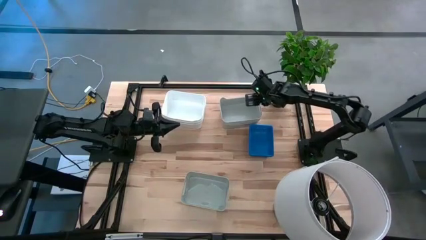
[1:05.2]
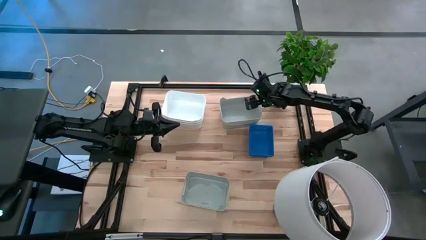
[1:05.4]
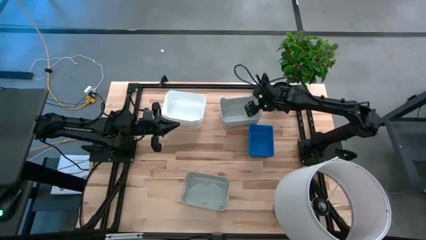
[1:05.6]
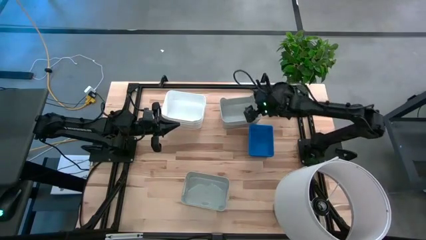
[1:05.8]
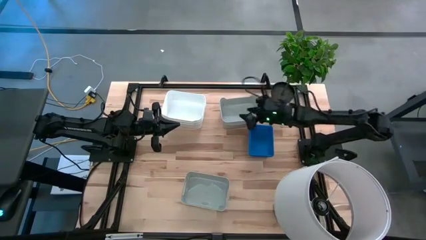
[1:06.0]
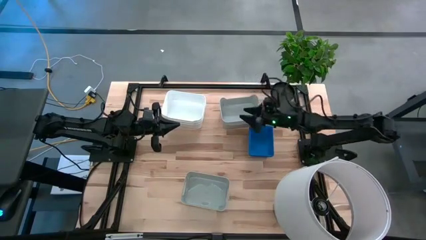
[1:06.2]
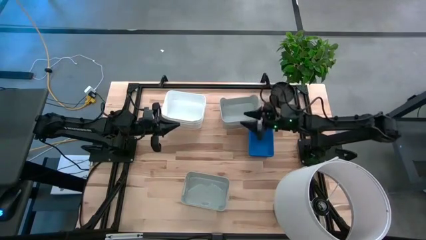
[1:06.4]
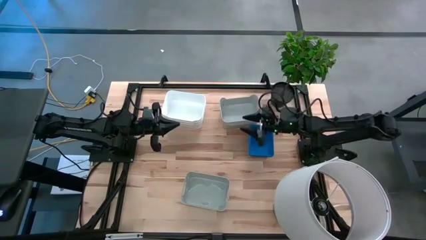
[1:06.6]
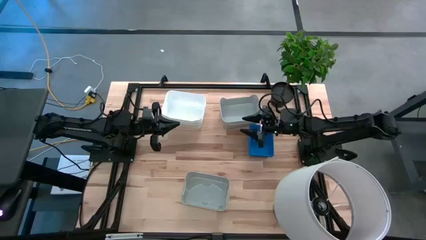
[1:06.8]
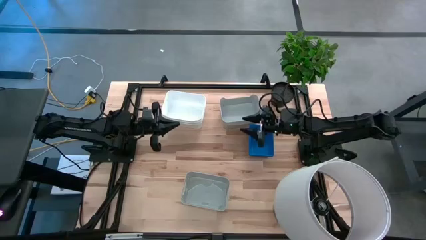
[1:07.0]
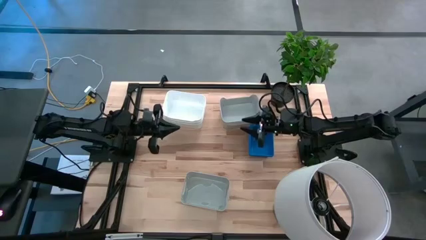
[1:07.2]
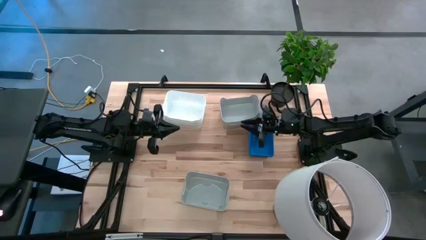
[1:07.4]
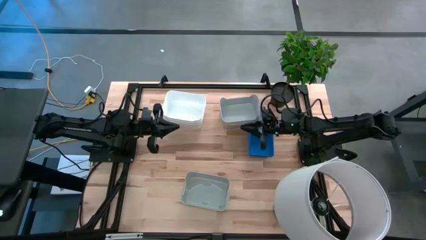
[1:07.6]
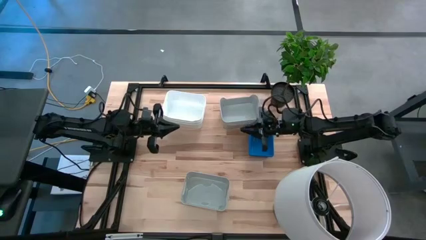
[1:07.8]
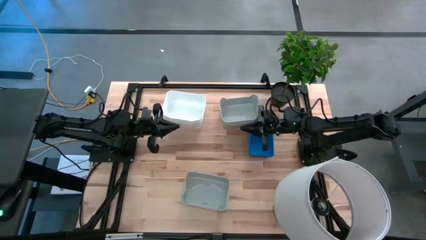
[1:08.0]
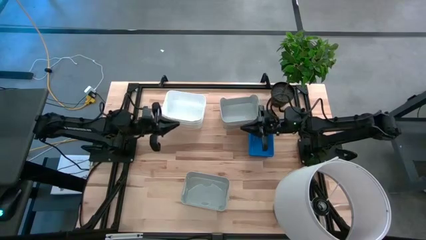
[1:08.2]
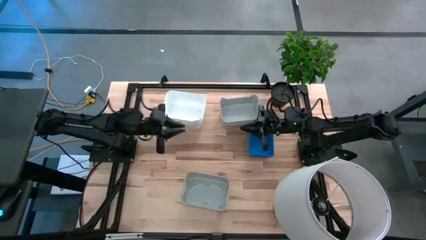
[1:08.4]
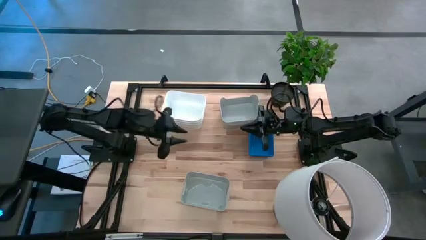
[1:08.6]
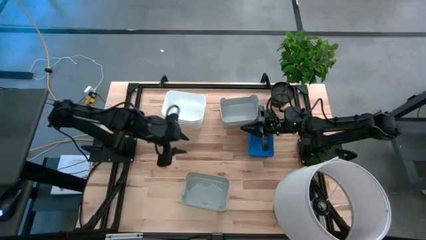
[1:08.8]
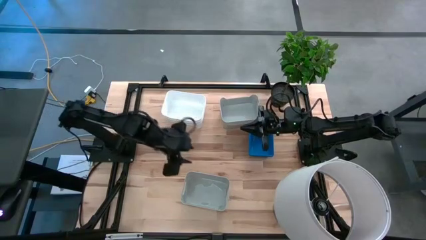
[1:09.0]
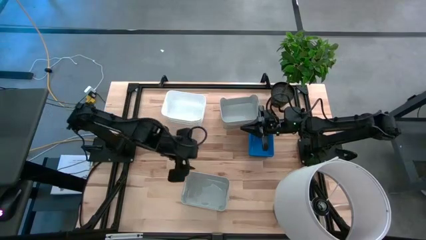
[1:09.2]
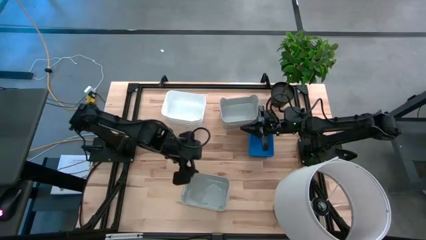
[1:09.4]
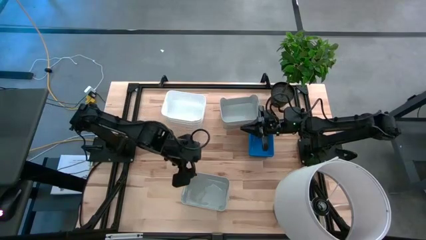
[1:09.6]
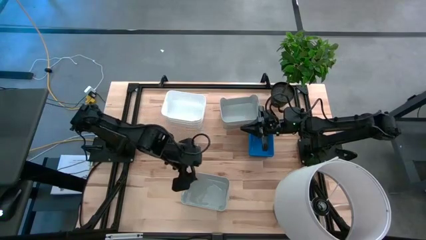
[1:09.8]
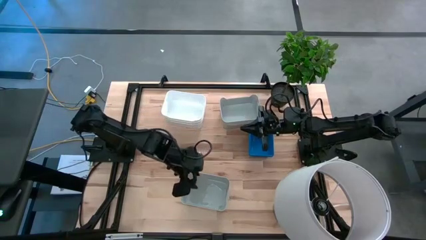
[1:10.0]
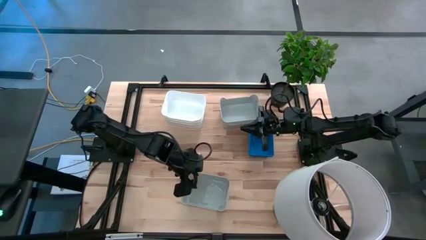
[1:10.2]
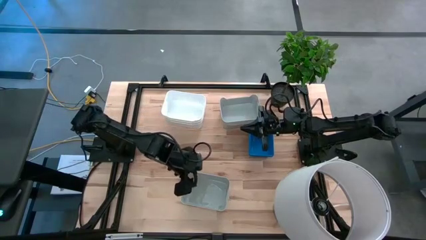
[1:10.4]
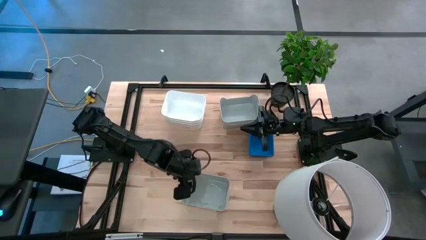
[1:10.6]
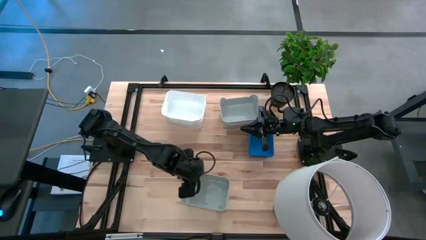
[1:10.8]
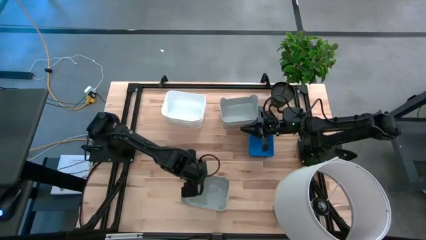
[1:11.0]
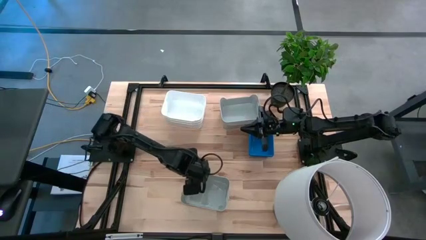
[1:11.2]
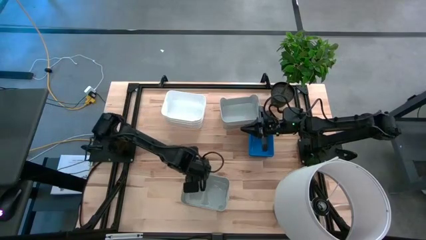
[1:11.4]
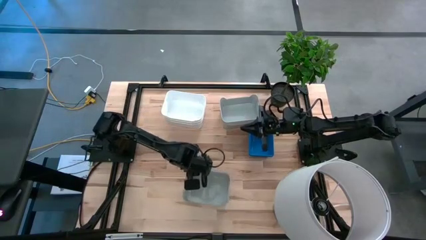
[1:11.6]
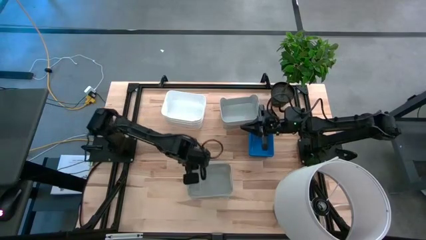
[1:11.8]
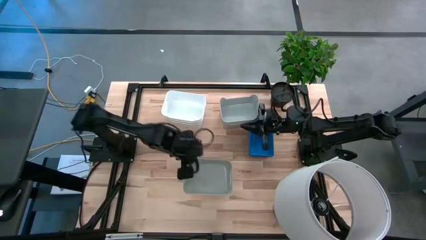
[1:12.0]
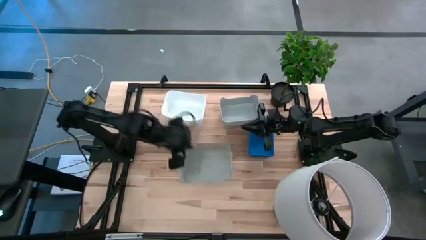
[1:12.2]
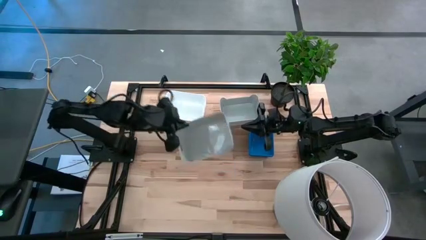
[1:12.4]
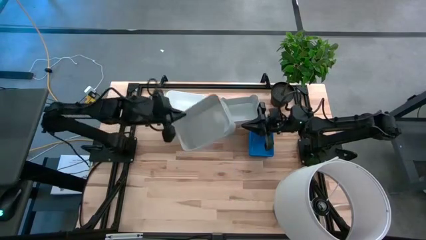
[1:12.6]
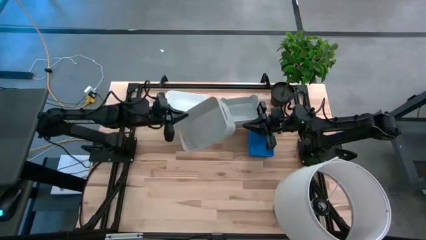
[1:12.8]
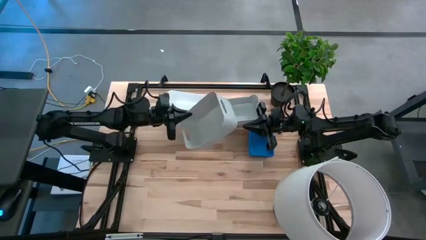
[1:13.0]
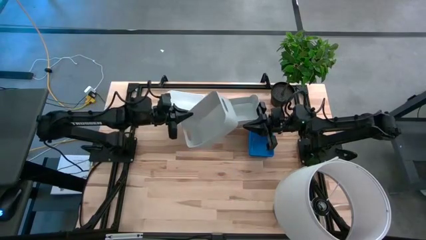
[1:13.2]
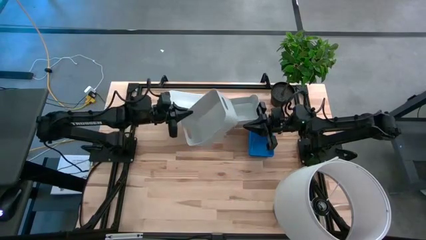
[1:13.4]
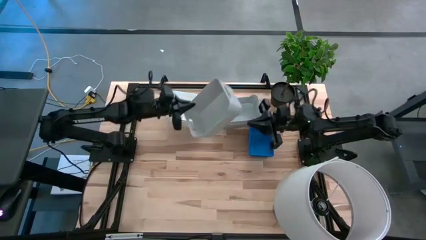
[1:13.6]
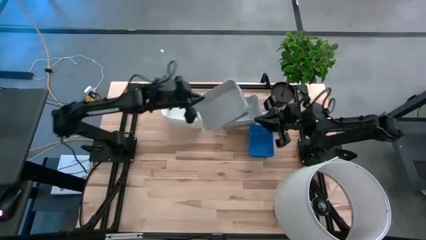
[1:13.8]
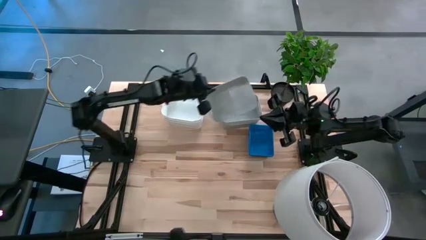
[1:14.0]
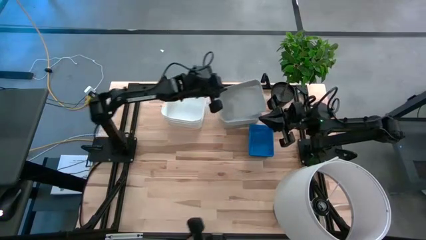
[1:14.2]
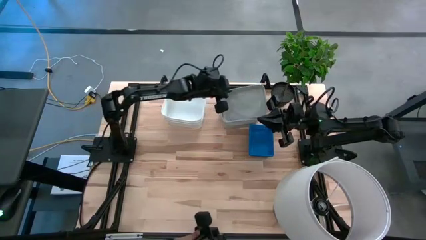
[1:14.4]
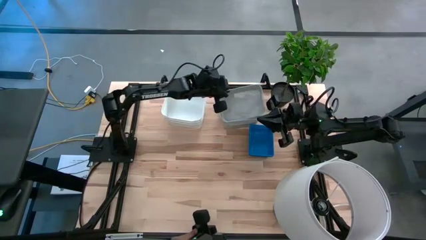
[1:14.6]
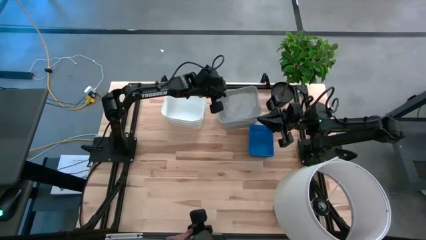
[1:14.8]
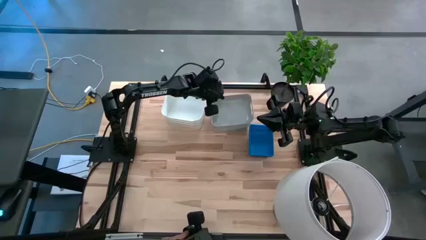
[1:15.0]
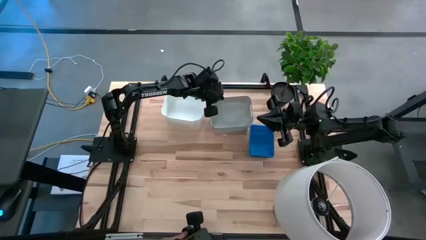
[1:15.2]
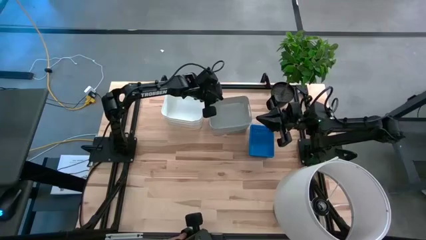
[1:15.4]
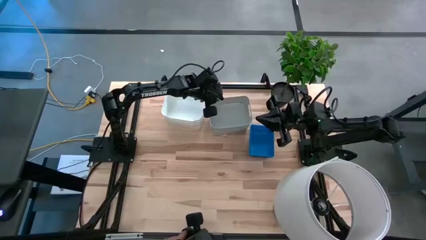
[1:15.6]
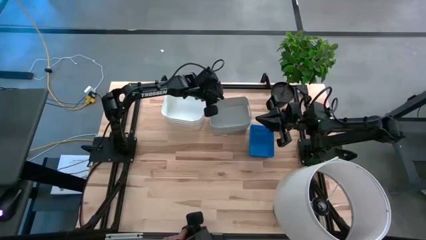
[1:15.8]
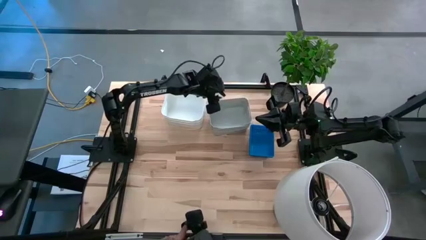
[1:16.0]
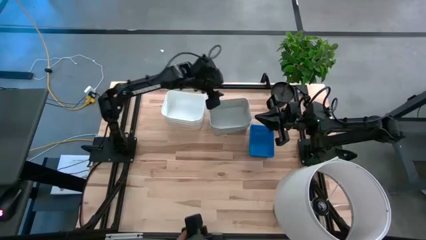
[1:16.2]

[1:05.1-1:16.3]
Stack the gray bin into the top right gray bin

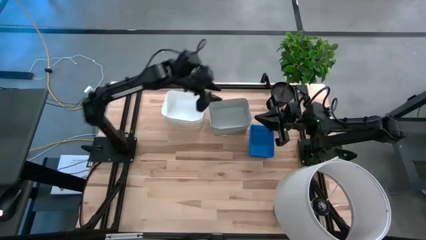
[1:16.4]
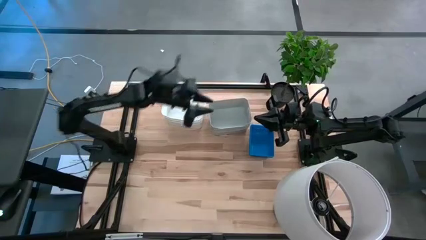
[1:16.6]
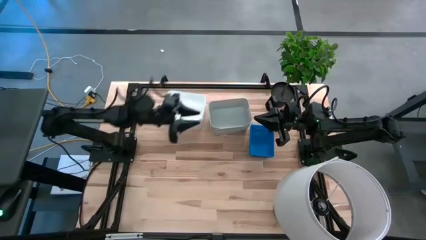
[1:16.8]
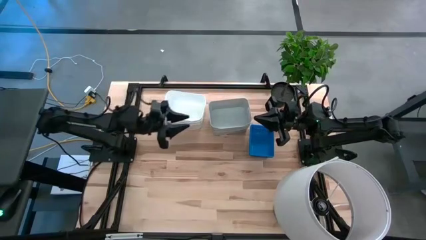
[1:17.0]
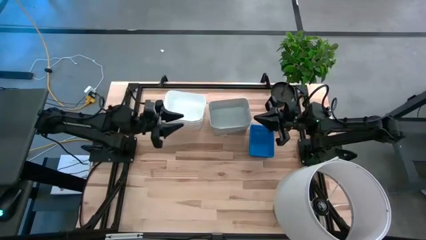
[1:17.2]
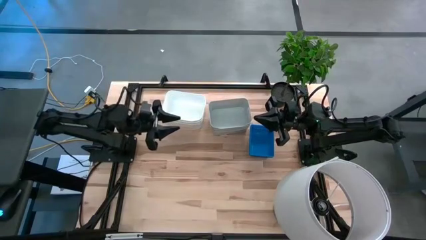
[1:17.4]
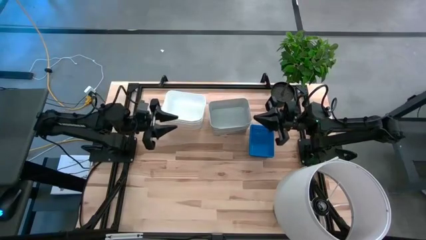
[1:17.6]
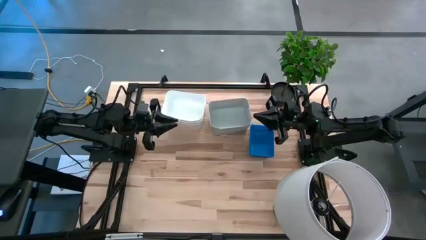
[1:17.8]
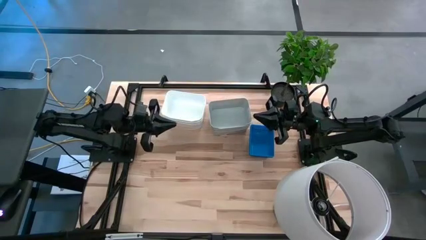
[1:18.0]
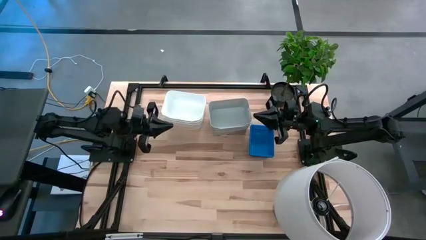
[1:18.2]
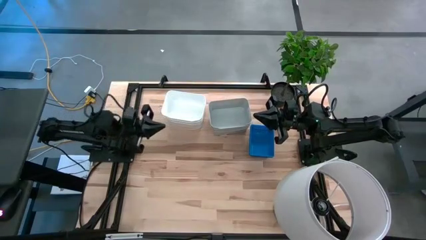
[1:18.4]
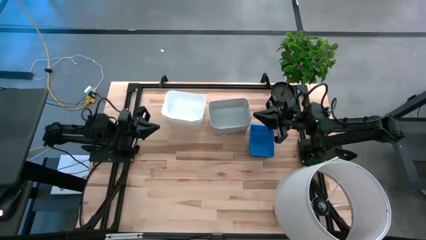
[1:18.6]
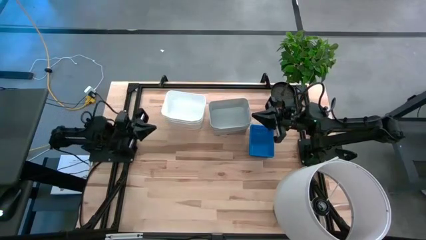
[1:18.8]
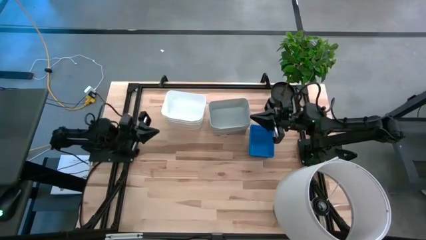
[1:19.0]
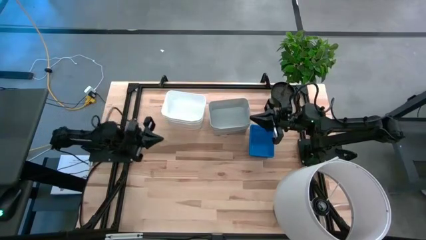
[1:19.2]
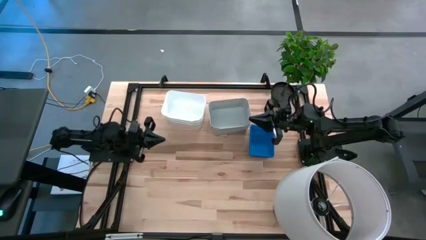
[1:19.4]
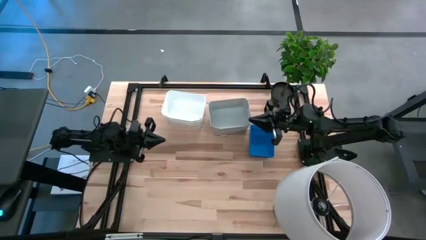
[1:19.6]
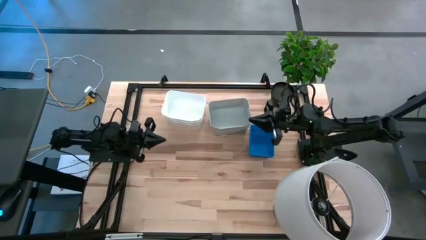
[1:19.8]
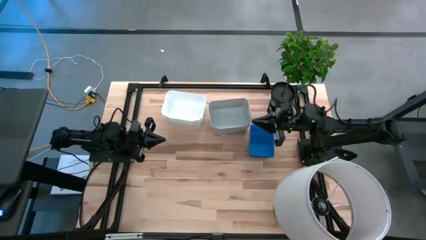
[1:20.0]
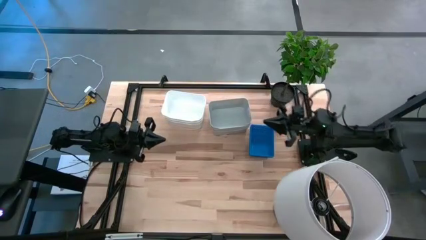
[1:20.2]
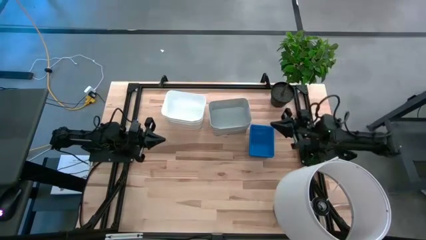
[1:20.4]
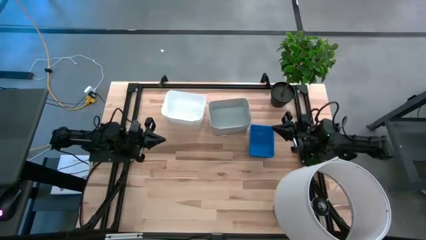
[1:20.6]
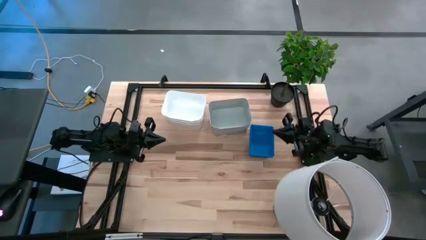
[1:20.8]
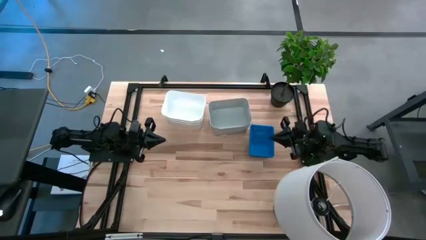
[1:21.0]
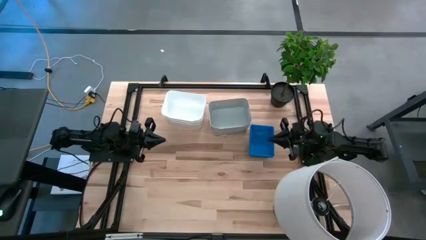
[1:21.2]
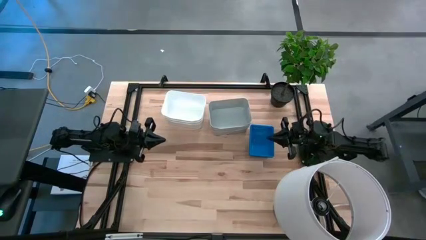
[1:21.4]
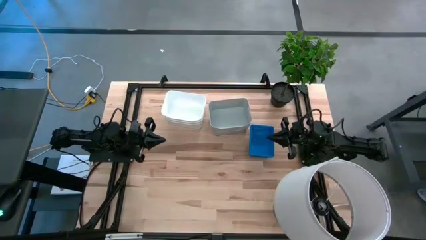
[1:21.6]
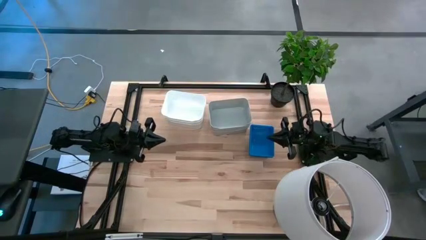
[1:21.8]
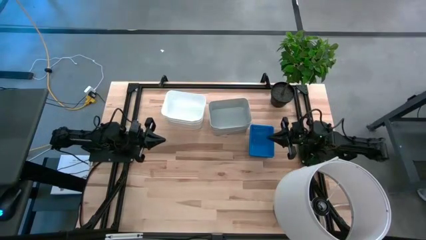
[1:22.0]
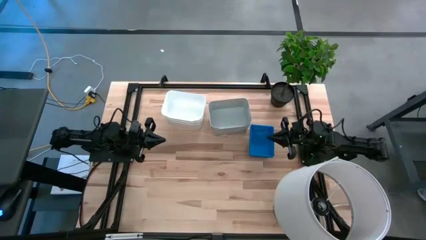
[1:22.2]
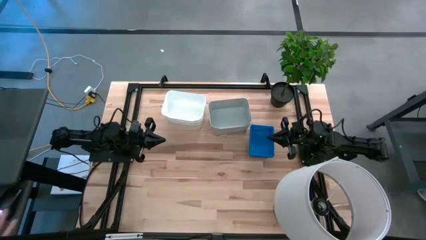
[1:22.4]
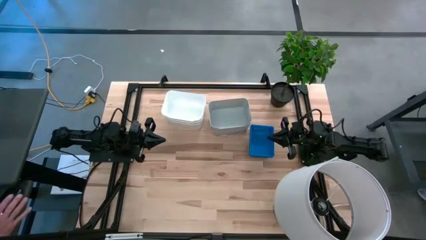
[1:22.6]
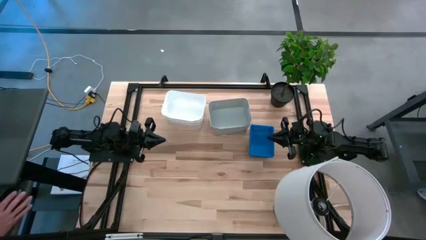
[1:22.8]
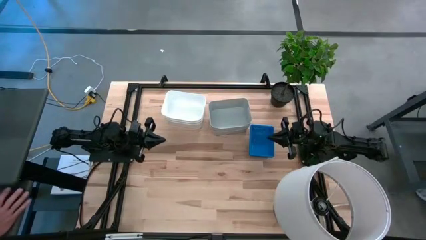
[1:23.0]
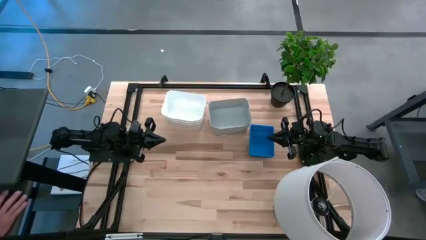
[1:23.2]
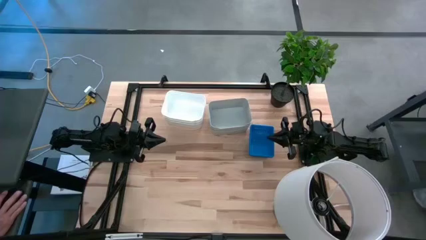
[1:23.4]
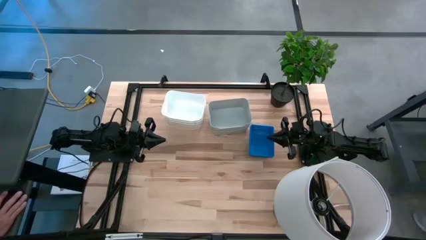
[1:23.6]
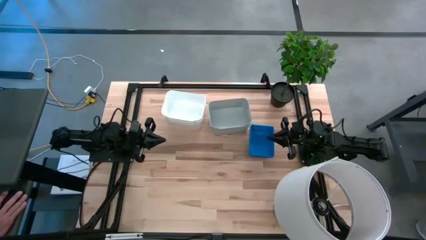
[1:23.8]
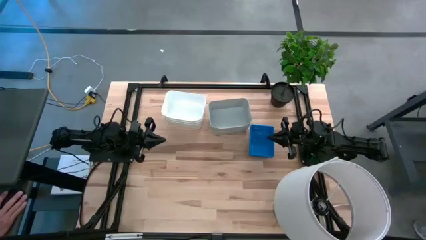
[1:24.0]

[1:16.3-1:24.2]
Return to Home Position
